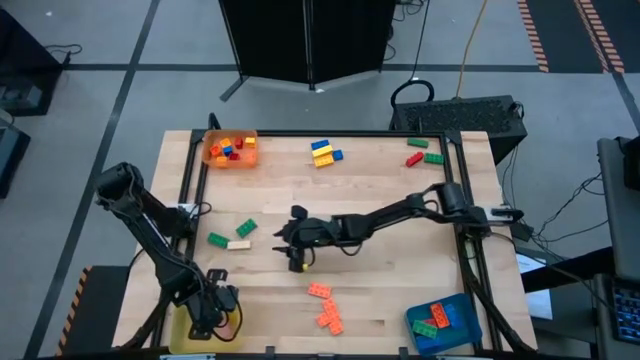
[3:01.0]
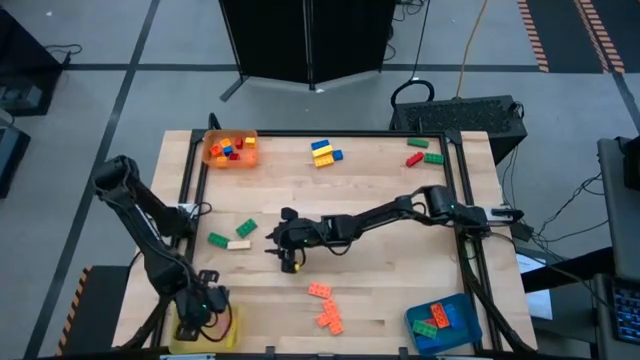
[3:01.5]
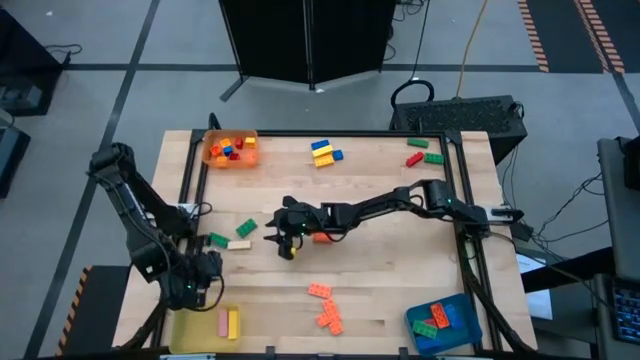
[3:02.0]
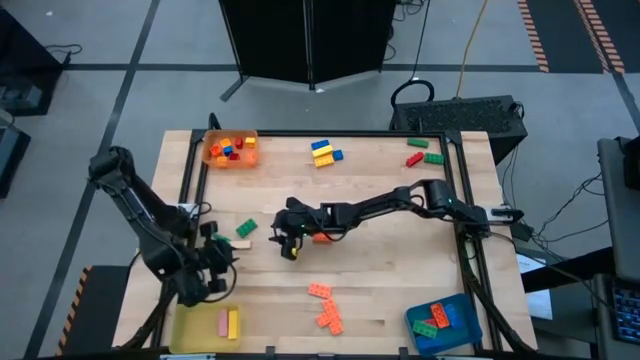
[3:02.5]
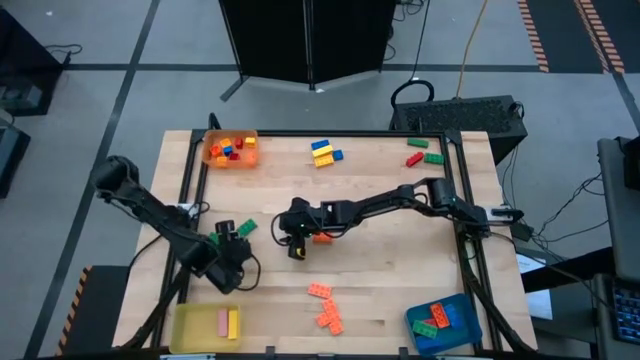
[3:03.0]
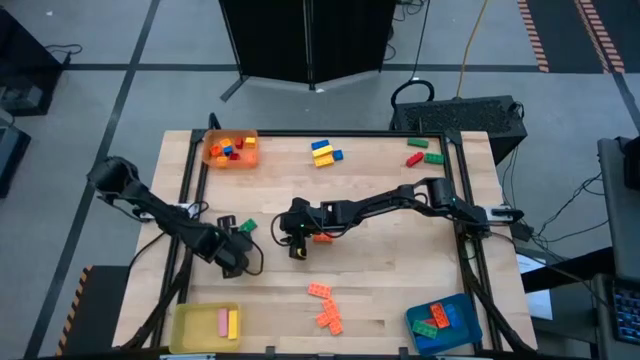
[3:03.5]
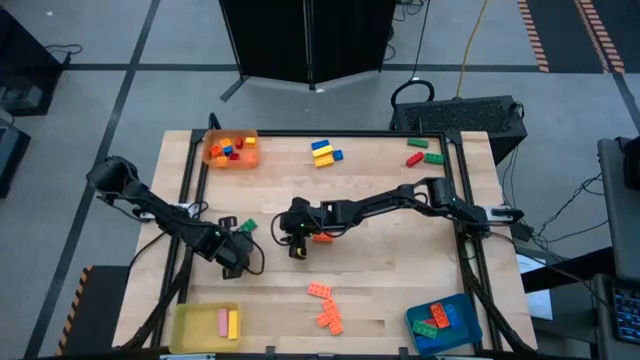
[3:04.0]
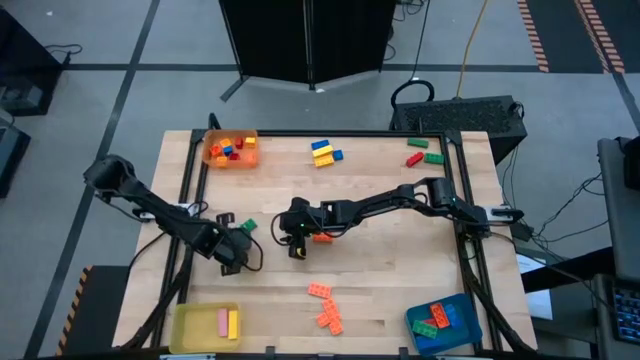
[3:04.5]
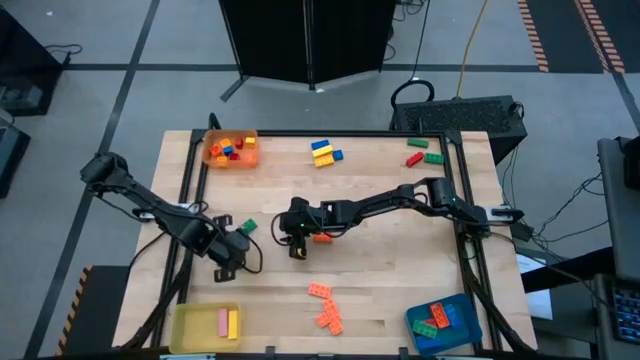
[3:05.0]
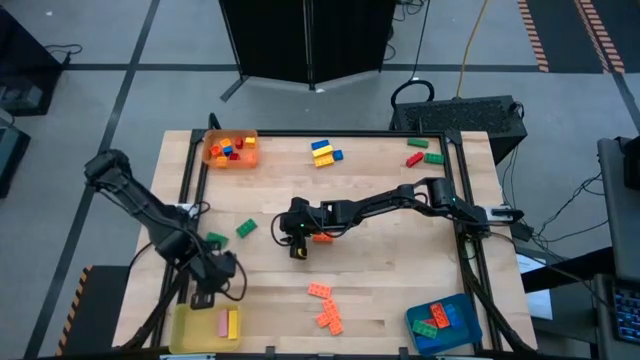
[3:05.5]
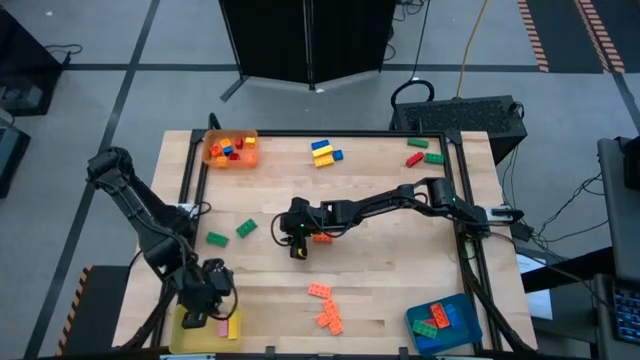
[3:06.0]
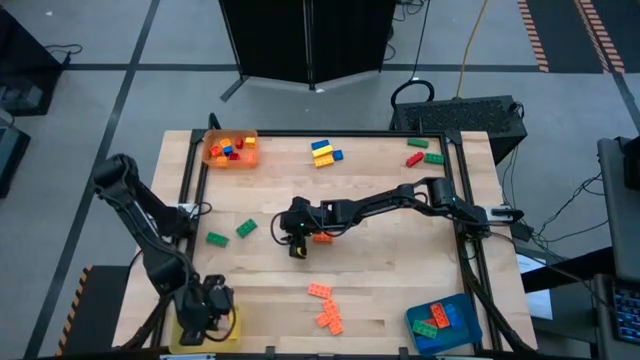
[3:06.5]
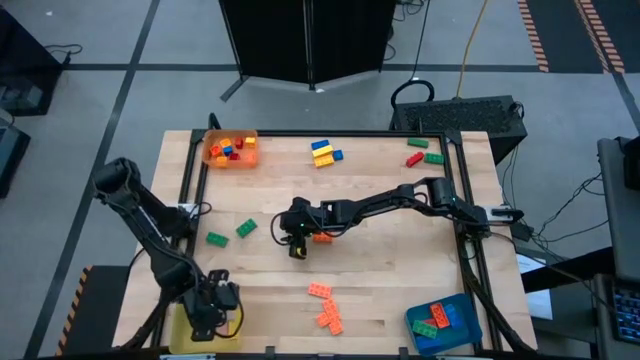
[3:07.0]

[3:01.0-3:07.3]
Task: Sort blocks by size
Put the brown block into the yellow bin

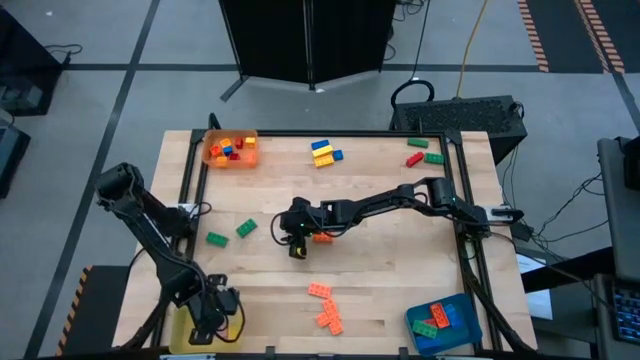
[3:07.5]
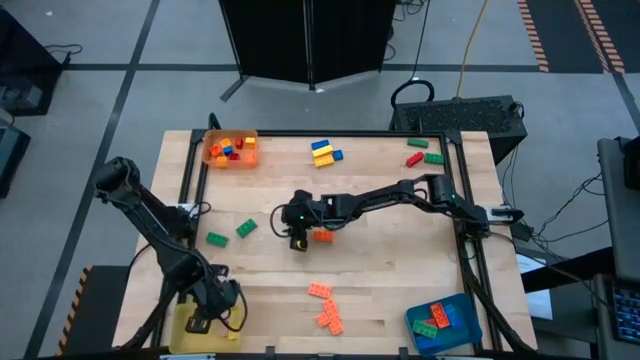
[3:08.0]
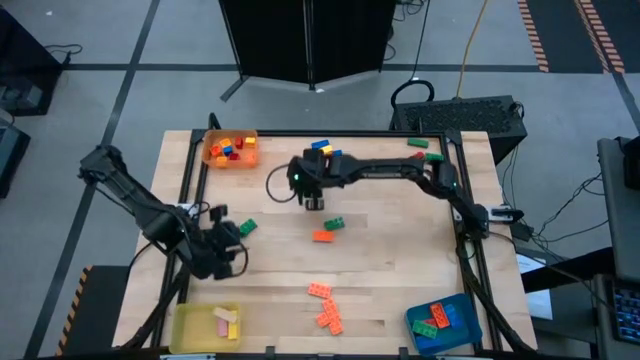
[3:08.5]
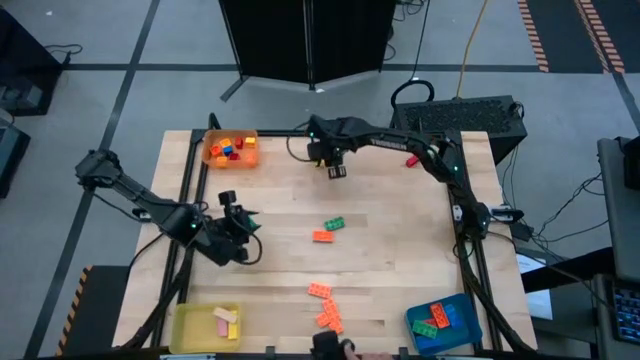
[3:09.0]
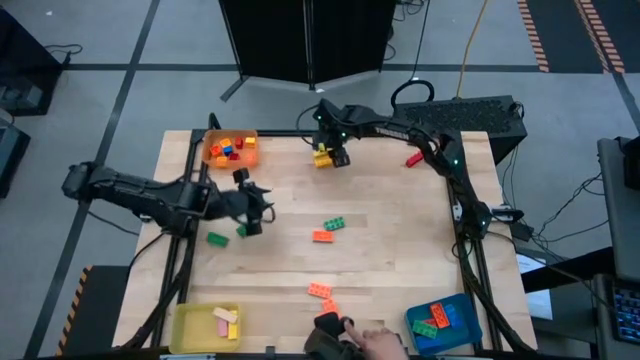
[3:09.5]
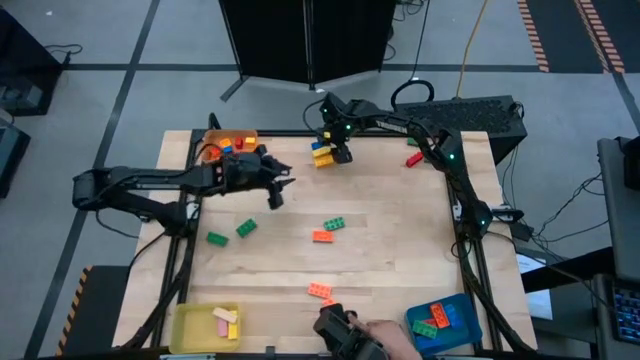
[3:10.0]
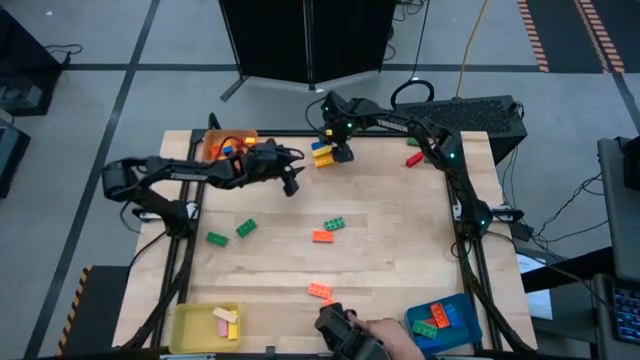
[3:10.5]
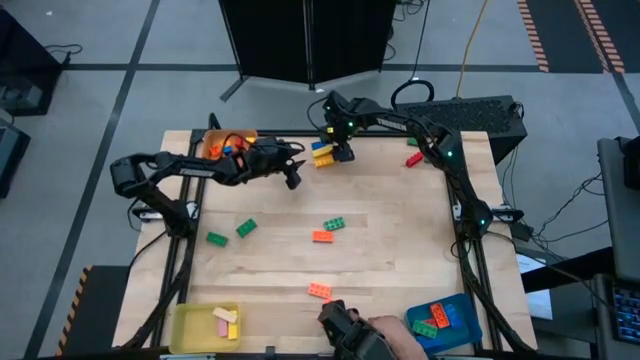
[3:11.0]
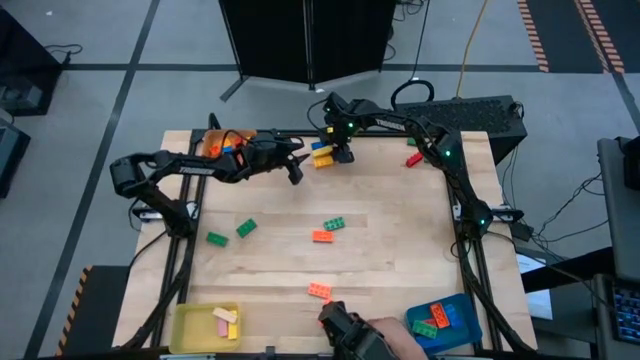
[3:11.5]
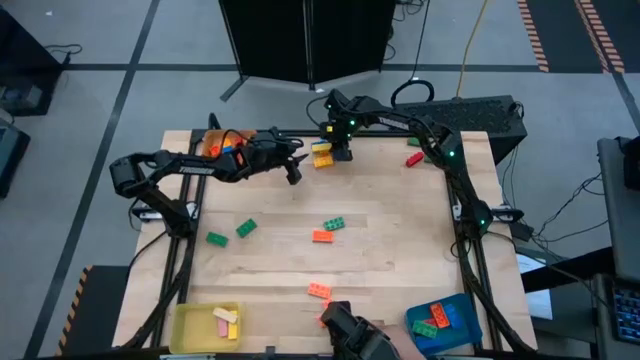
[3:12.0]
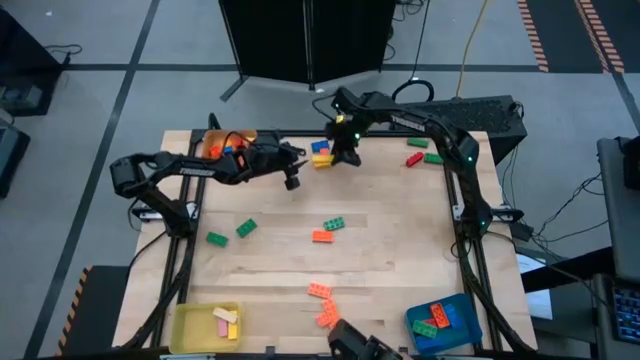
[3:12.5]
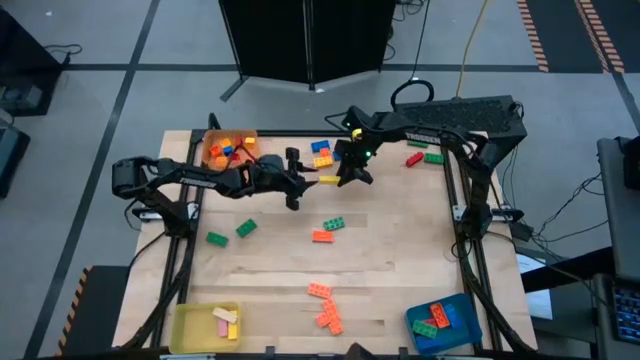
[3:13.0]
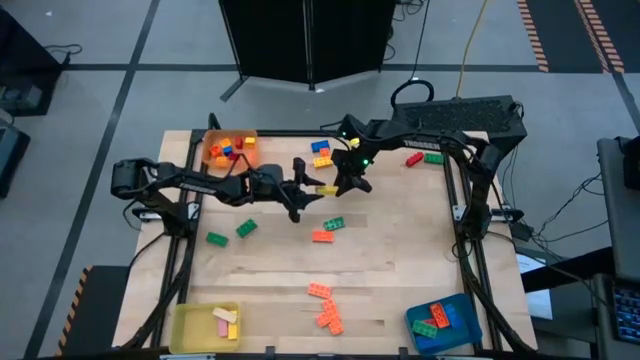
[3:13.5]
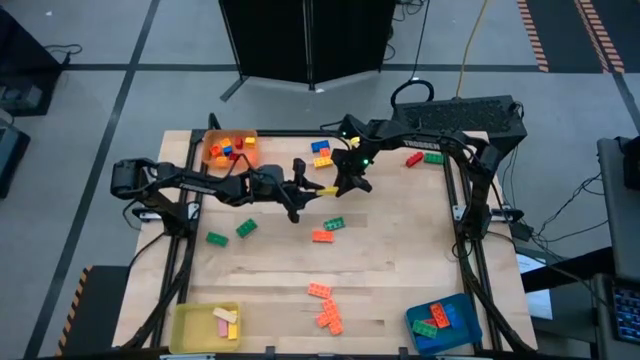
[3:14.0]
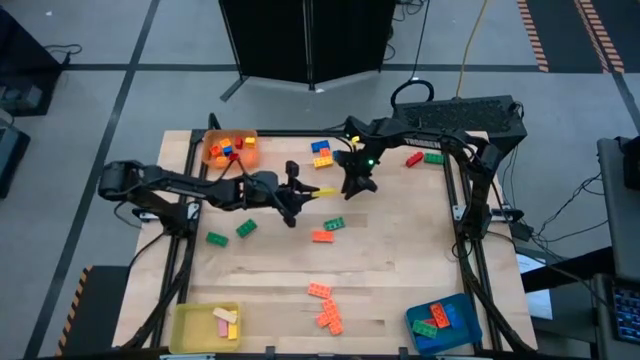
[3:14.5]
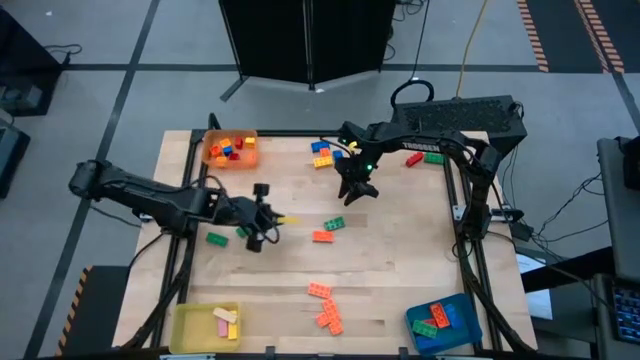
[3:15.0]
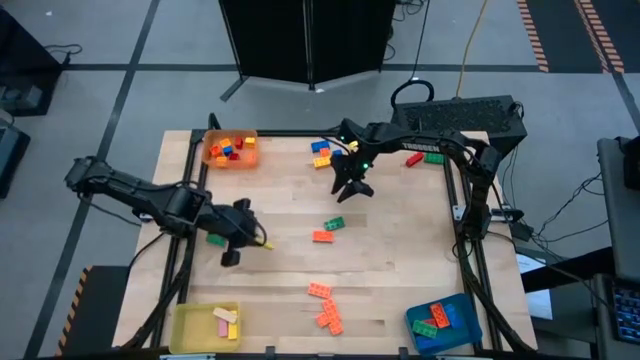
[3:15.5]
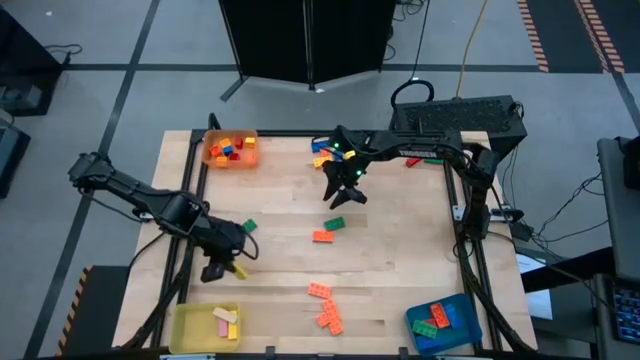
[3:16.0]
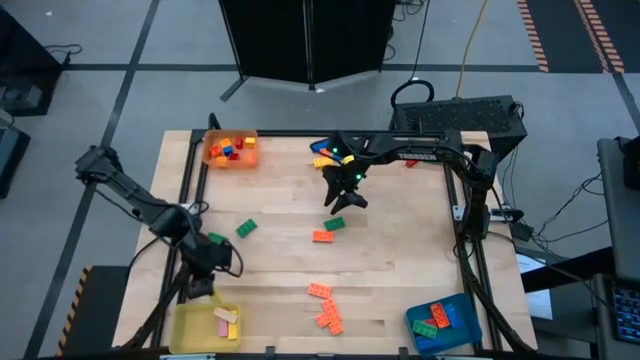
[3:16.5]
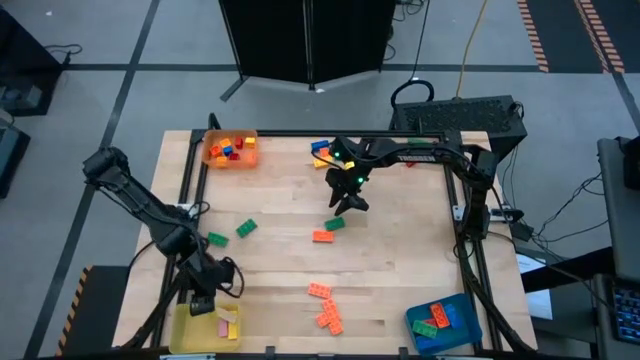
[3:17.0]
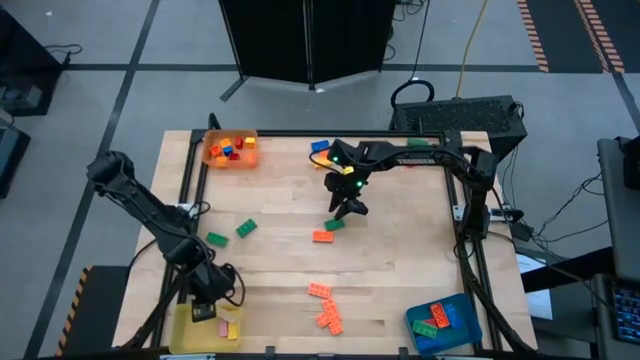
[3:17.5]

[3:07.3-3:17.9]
Put the yellow block into the yellow bin

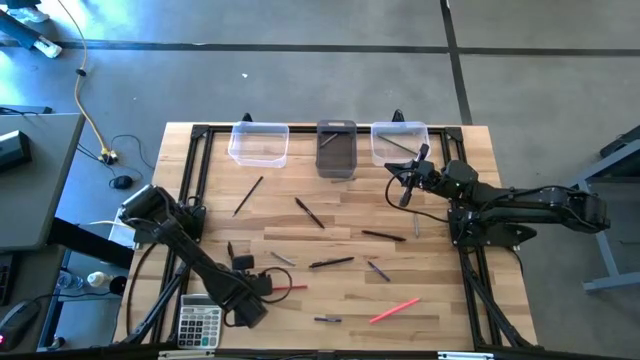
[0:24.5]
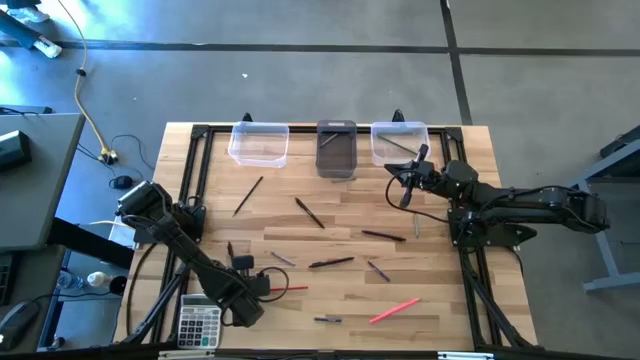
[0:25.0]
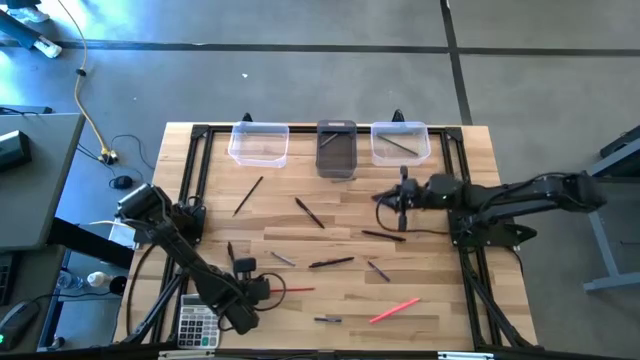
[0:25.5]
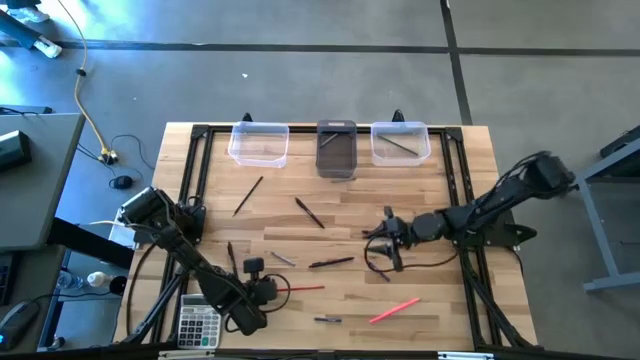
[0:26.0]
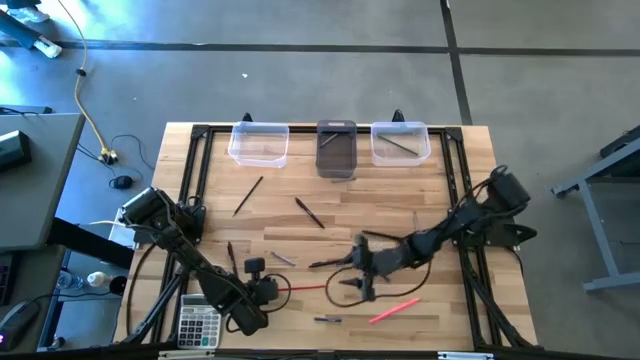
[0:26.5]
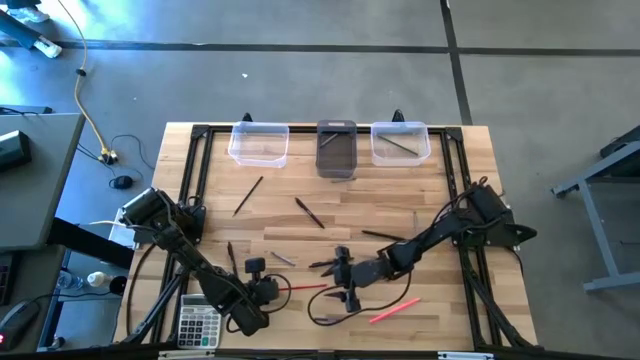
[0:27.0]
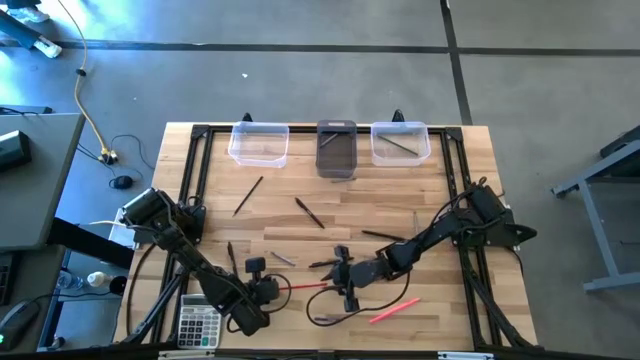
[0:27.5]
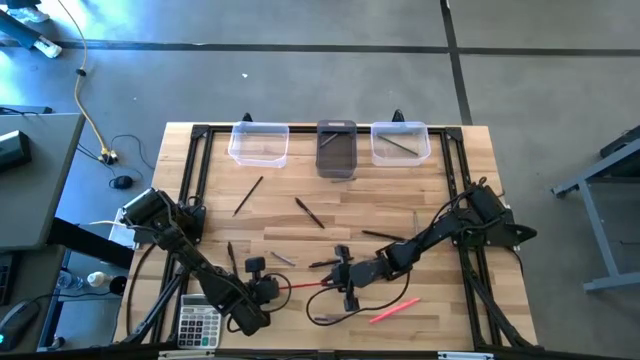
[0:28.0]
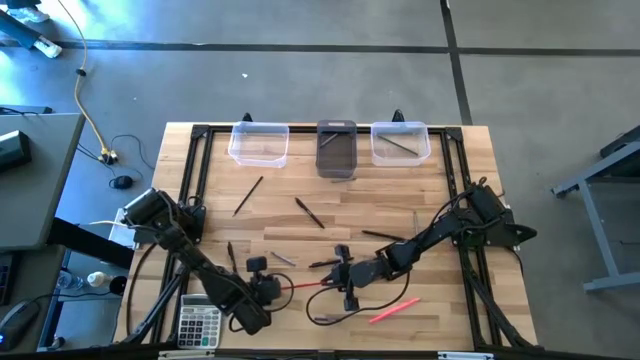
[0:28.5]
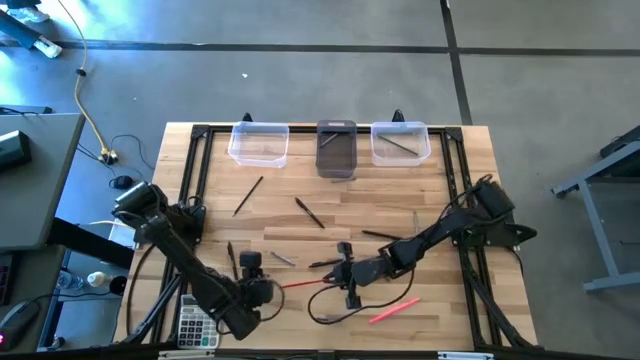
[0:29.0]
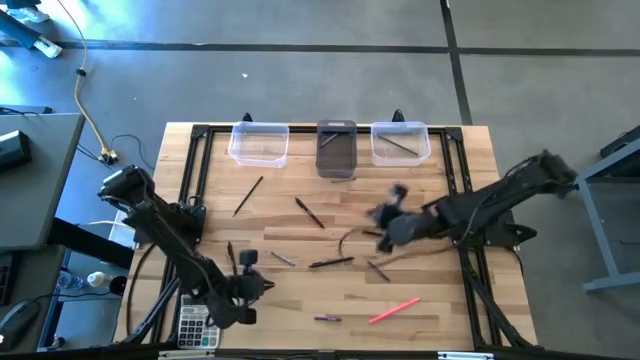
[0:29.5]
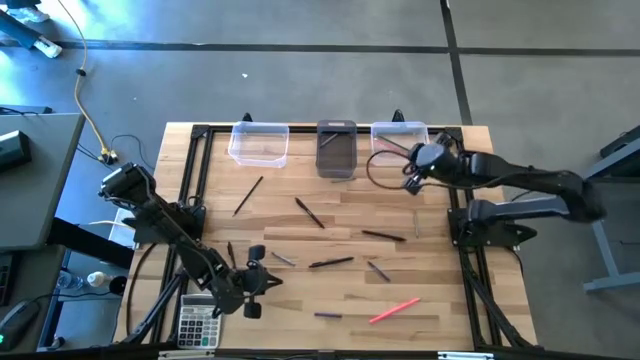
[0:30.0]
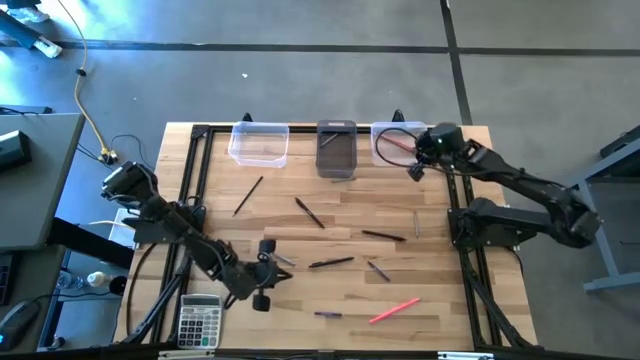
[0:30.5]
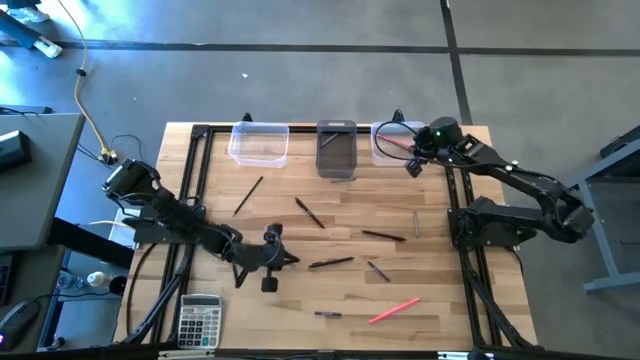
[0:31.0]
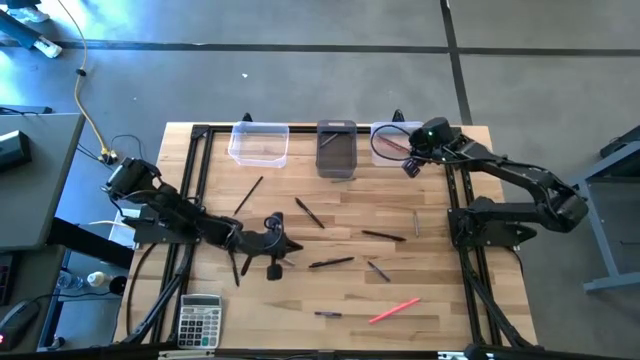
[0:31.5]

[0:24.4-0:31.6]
Task: Sort crayons/erasers/pens/pencils in bins
Put the red pencil into the right transparent bin
